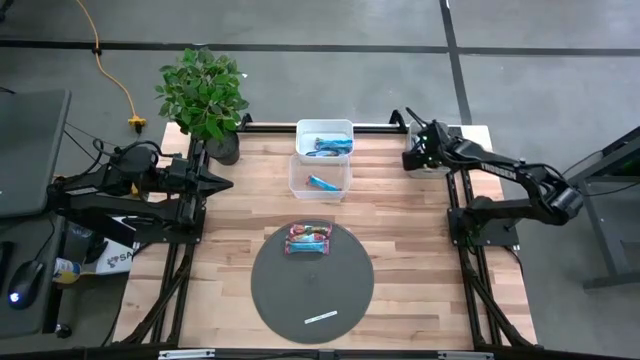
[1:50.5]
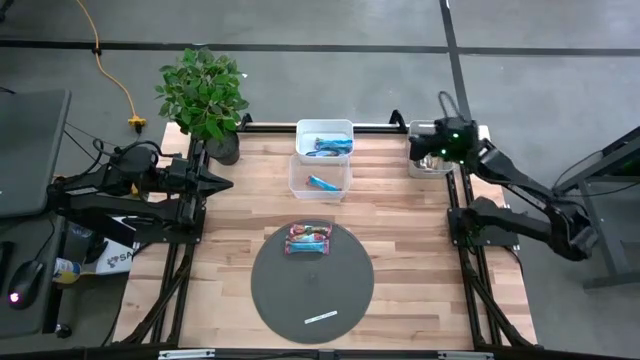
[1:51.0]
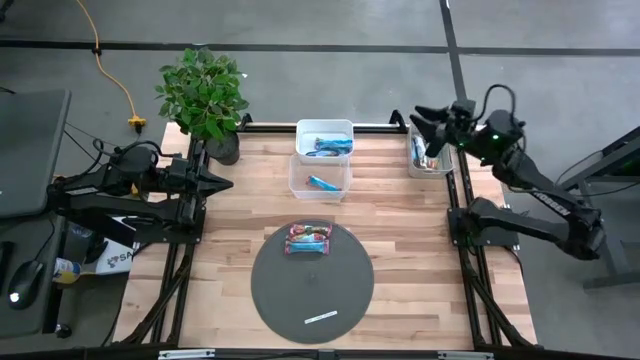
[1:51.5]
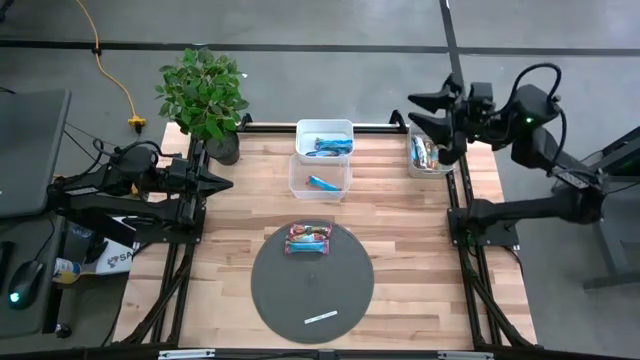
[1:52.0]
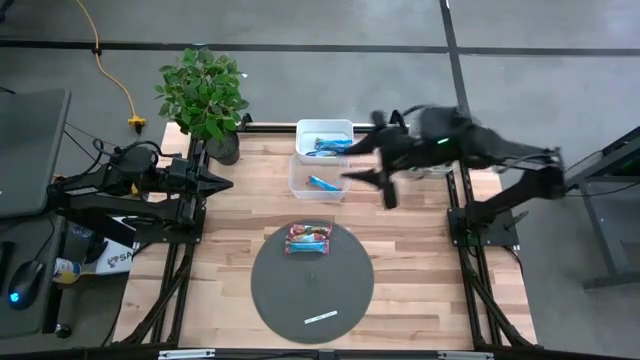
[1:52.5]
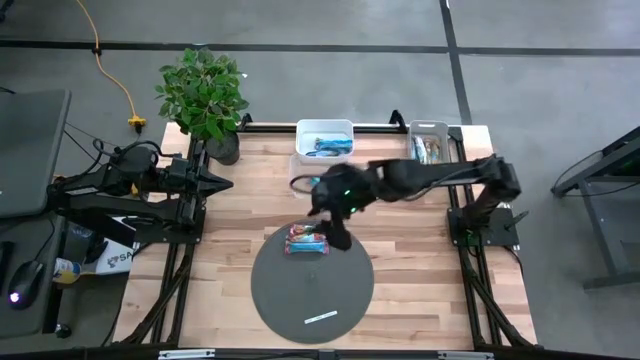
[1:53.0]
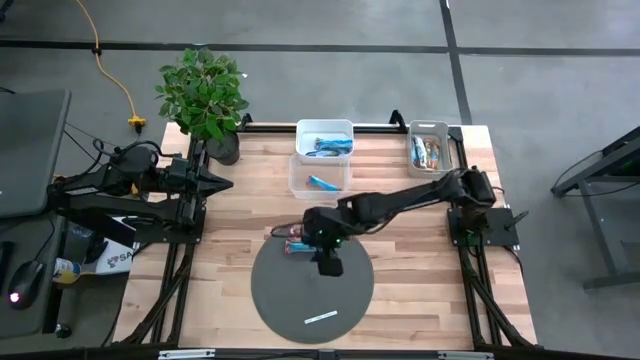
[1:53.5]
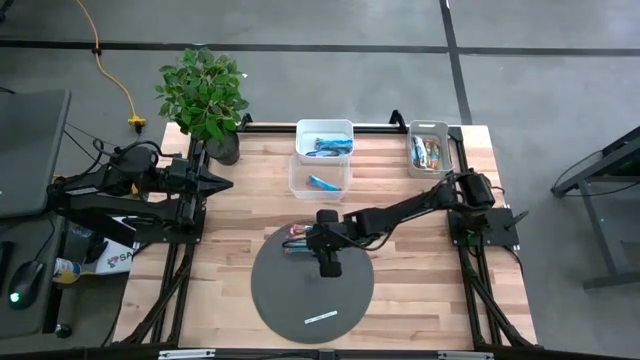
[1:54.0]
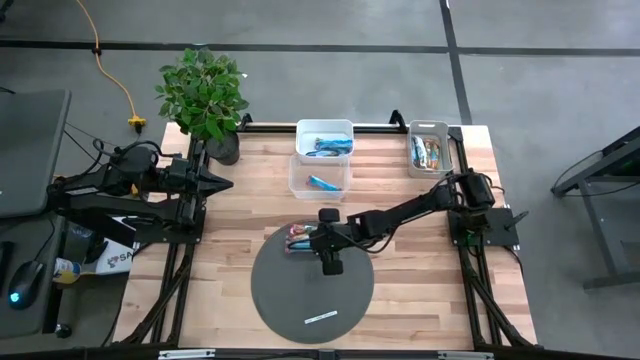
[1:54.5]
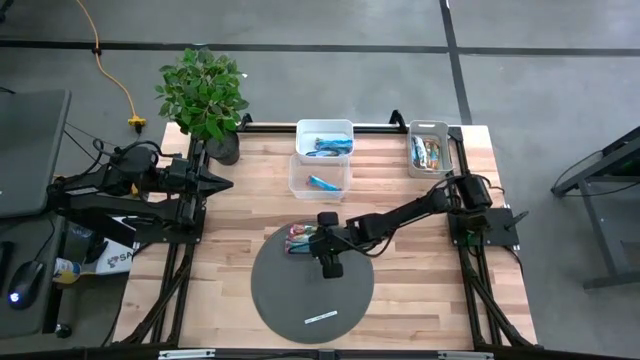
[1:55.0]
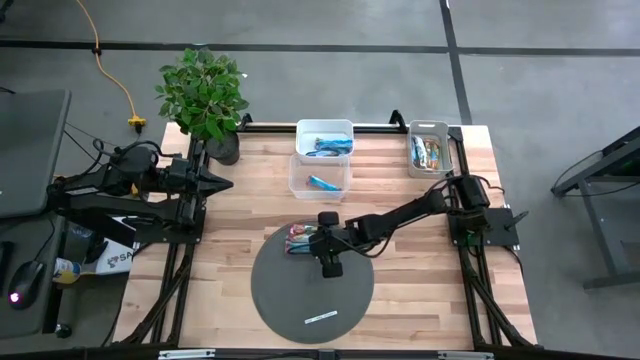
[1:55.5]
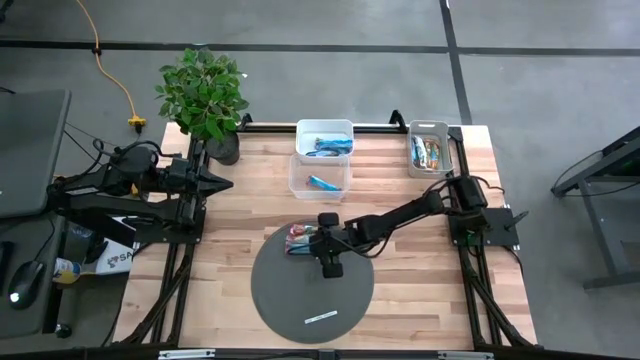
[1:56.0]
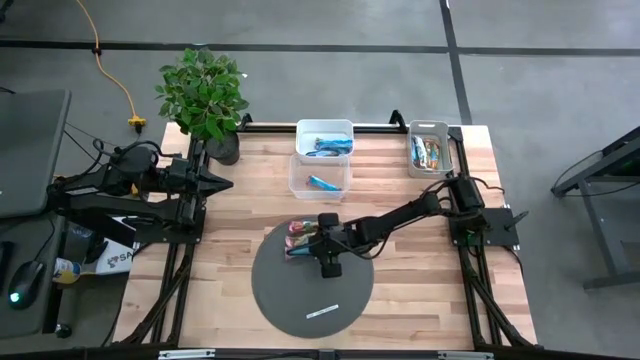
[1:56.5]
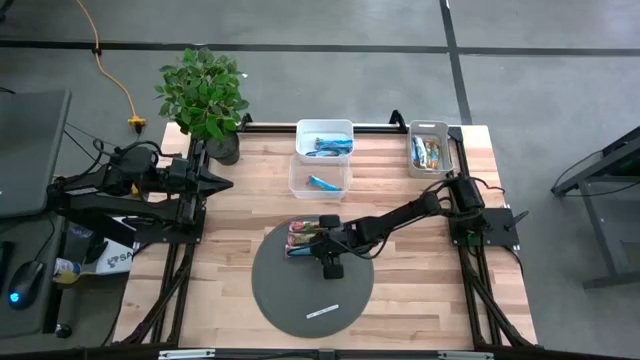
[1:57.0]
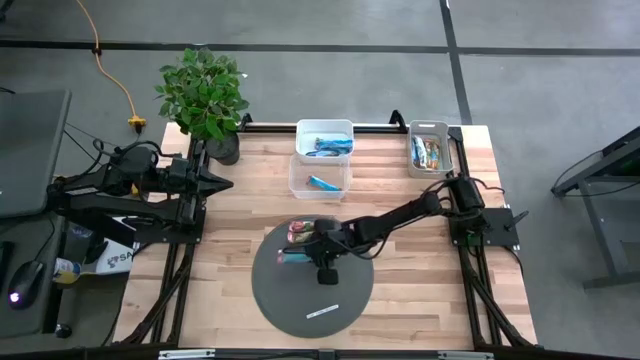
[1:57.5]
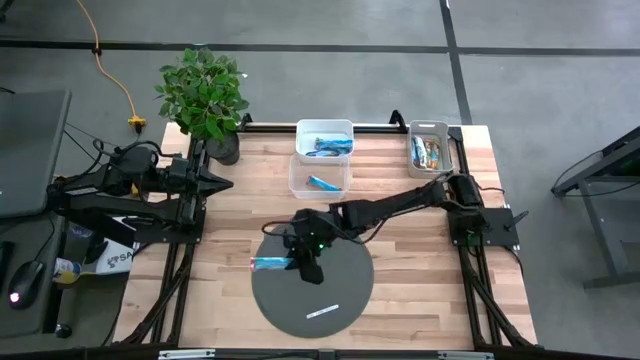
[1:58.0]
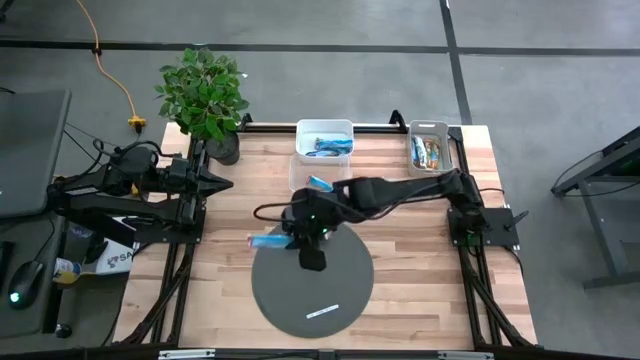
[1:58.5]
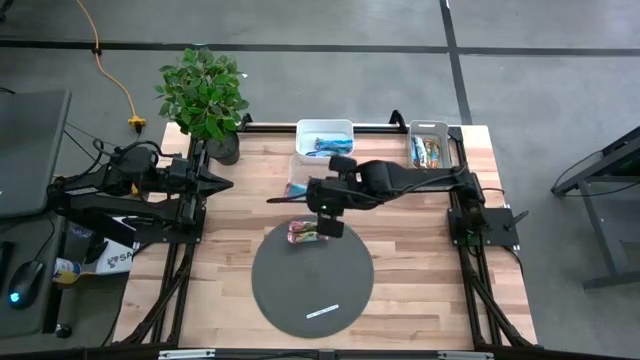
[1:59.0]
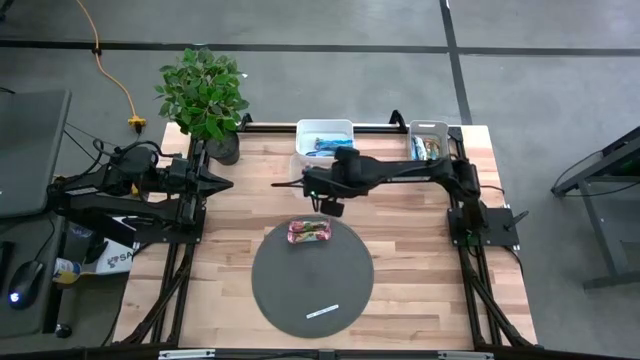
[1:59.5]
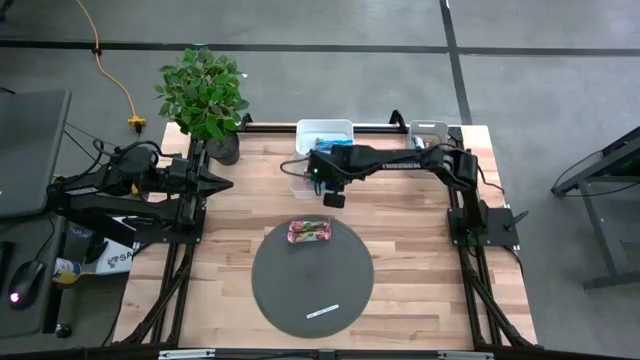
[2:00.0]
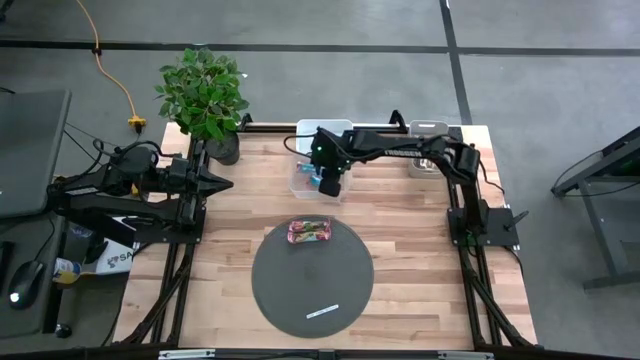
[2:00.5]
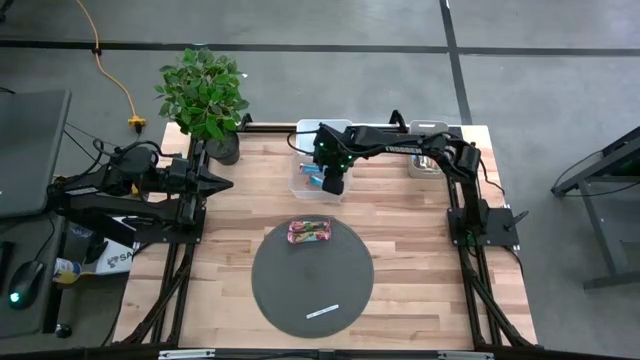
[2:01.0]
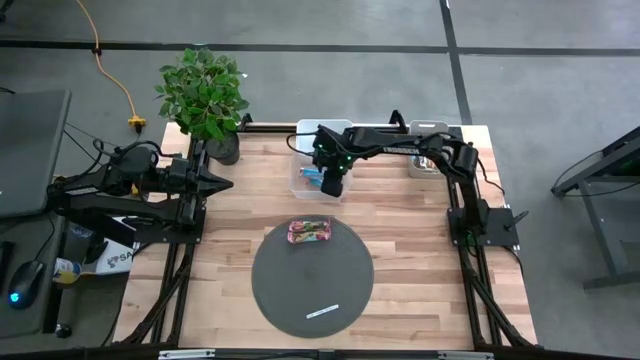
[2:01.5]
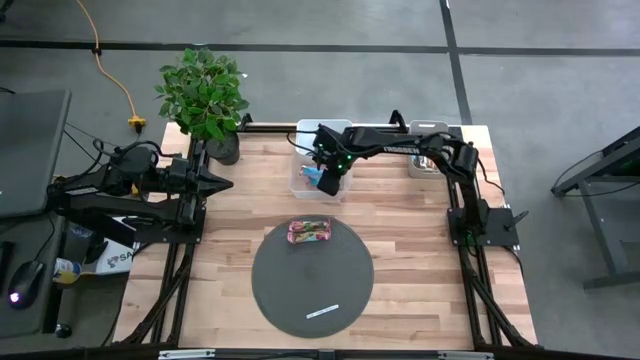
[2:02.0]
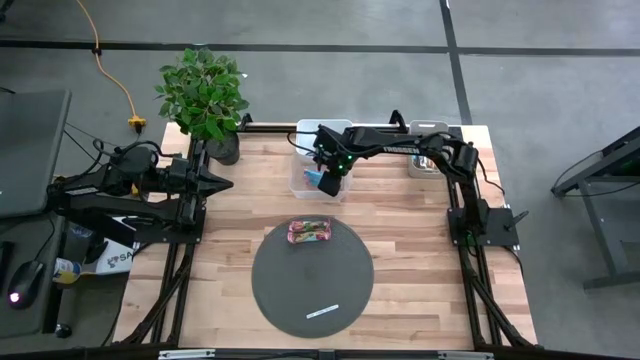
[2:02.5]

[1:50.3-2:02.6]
Task: Pick and place Granola Bars by type
Put the red granola bar into the transparent bin

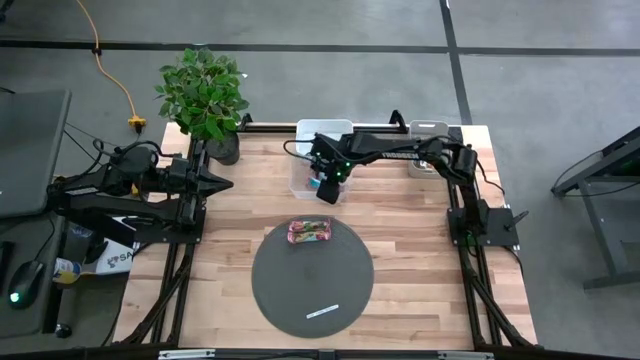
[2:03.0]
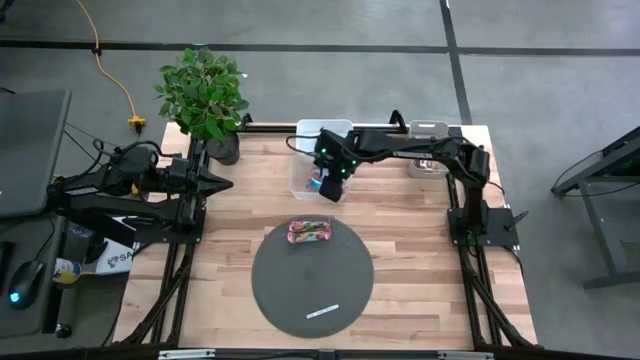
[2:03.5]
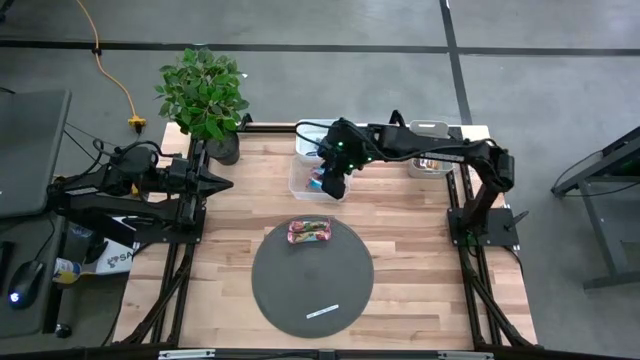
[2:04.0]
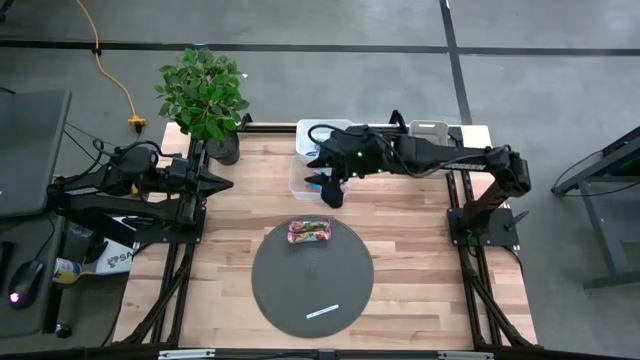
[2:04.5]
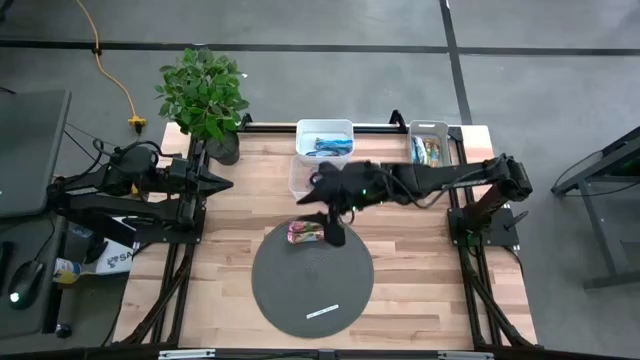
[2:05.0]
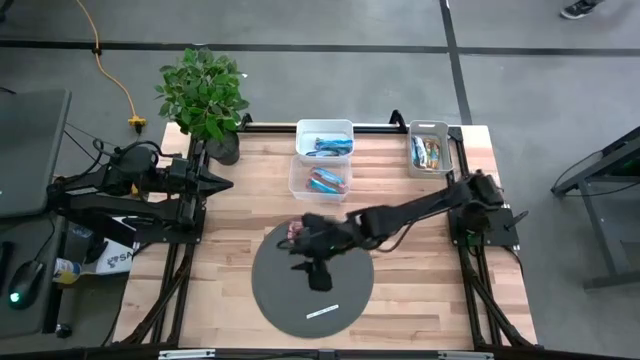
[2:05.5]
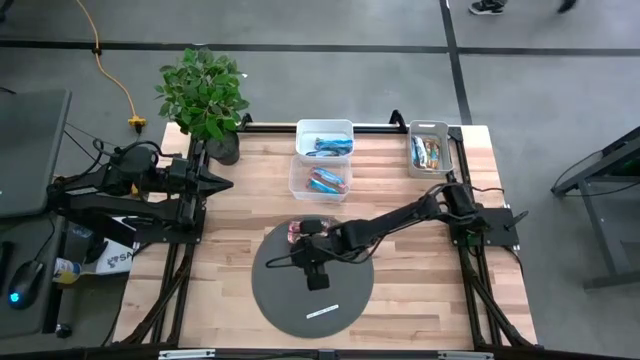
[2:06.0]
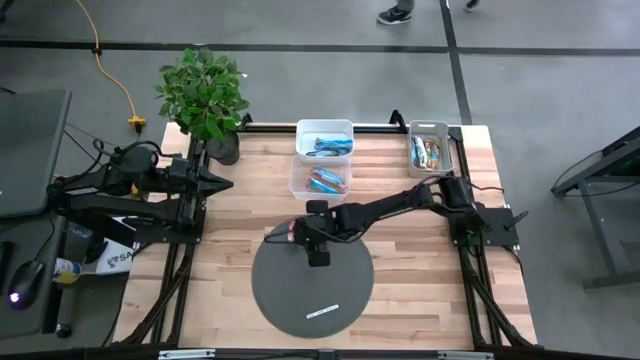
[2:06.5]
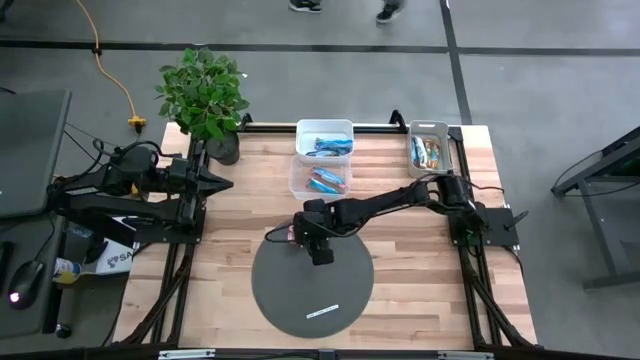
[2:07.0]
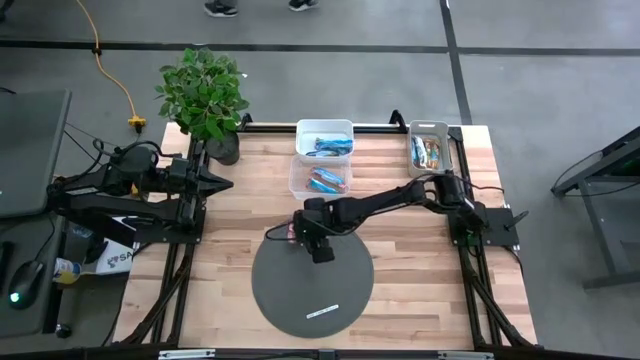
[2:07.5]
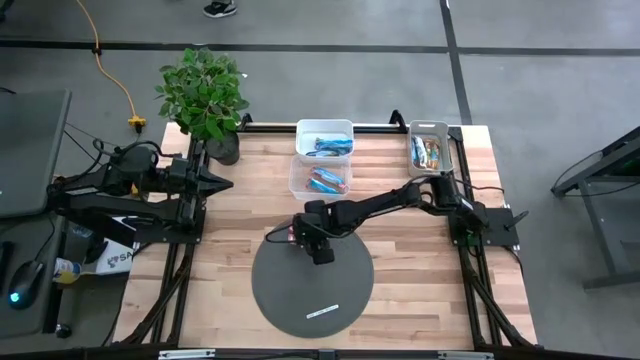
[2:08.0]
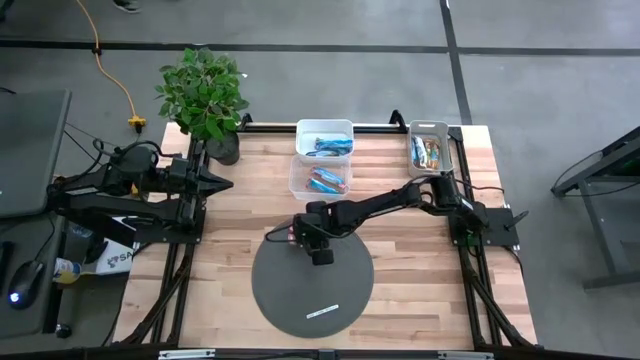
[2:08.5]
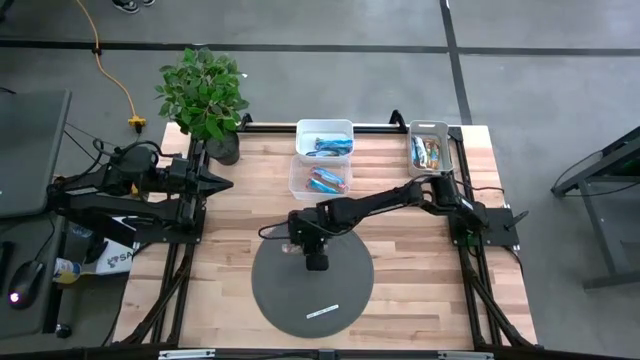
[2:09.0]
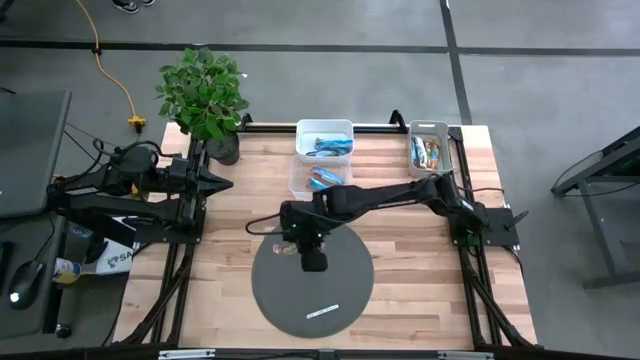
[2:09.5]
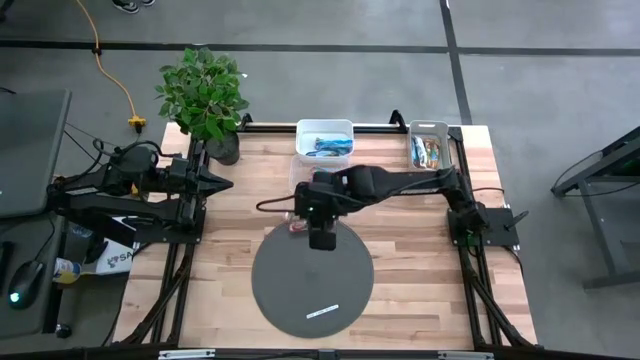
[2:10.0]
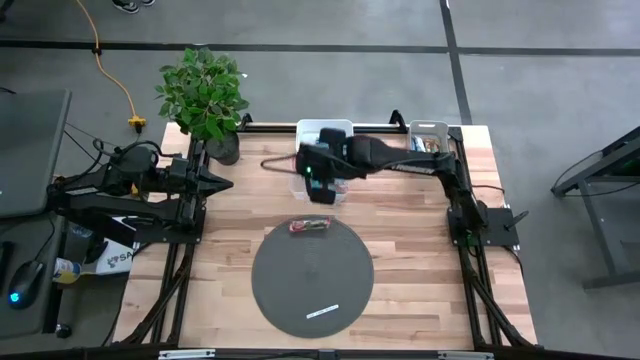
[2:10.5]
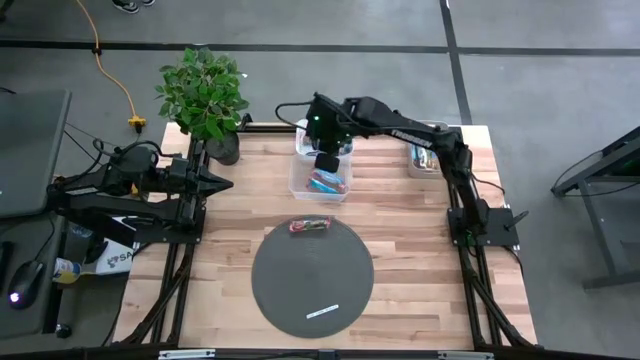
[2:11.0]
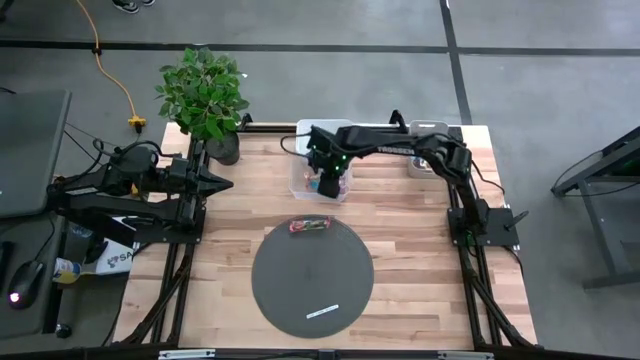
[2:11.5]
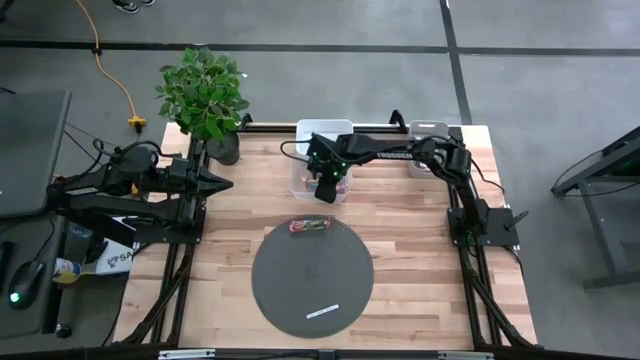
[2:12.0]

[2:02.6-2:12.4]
Put the red granola bar into the transparent bin
